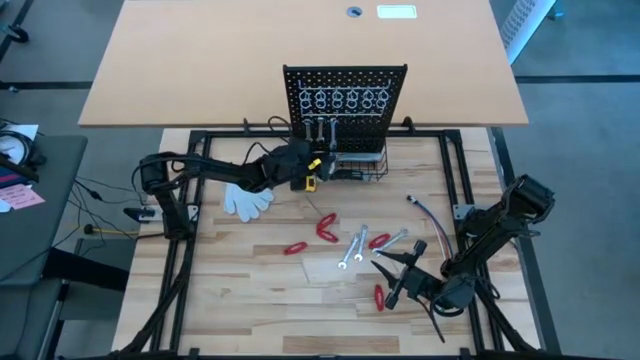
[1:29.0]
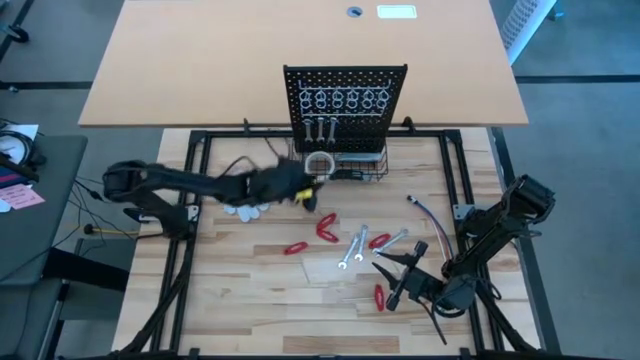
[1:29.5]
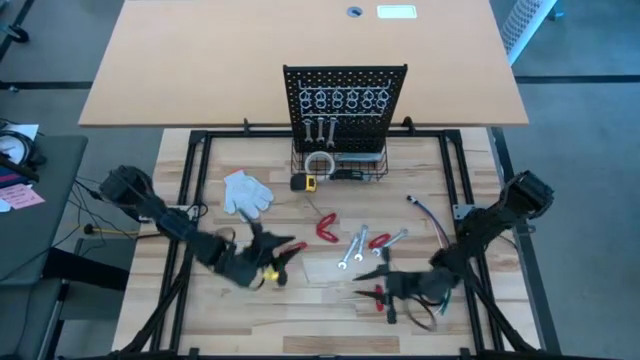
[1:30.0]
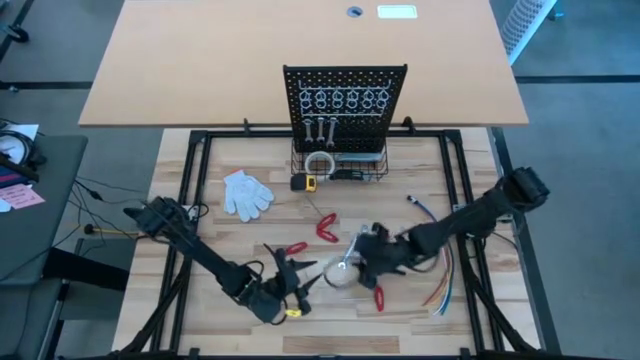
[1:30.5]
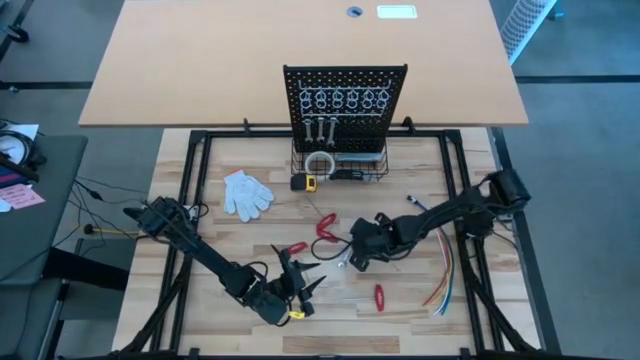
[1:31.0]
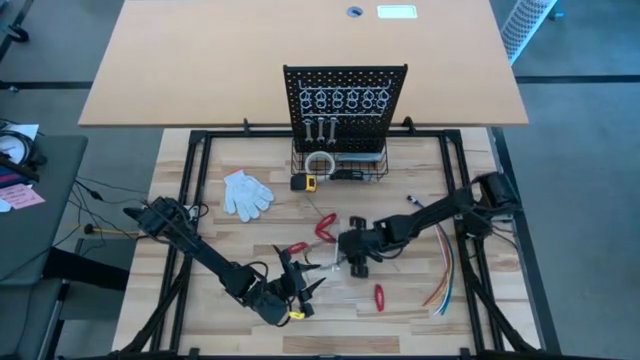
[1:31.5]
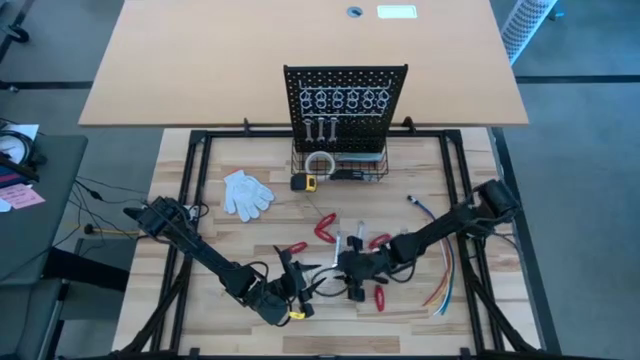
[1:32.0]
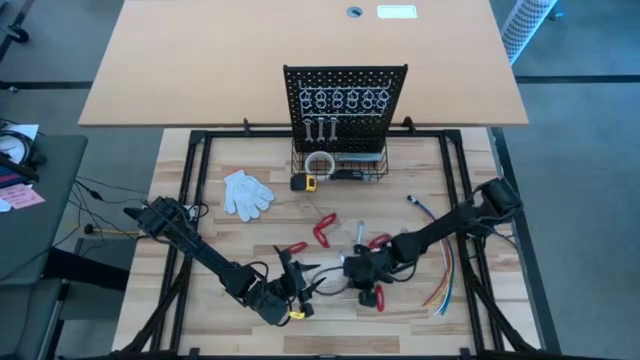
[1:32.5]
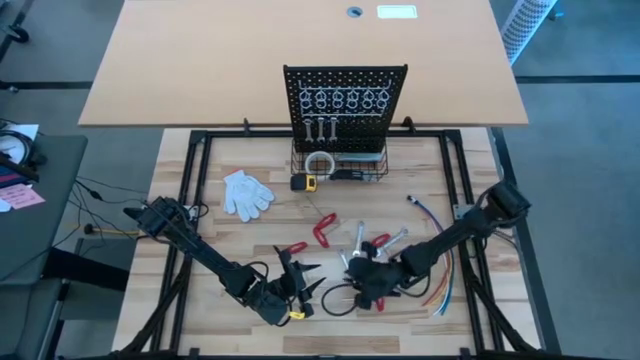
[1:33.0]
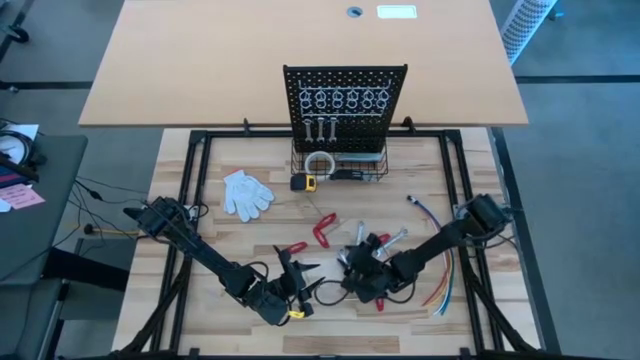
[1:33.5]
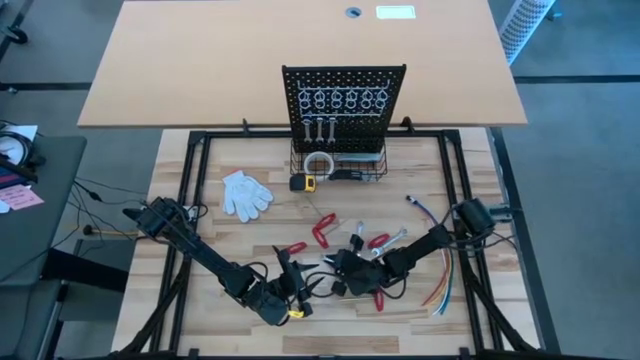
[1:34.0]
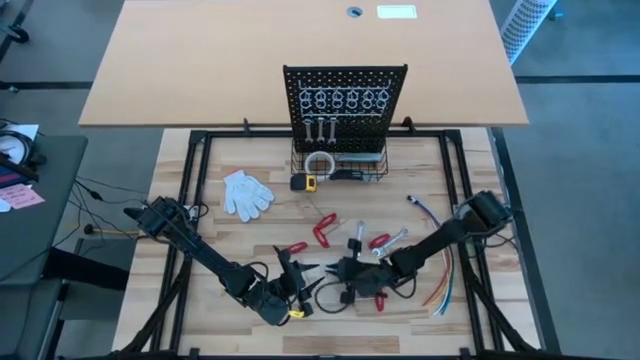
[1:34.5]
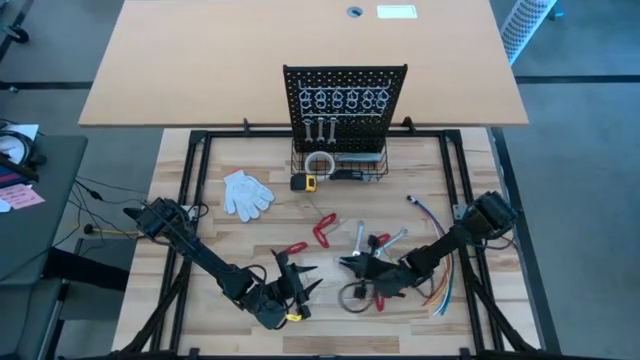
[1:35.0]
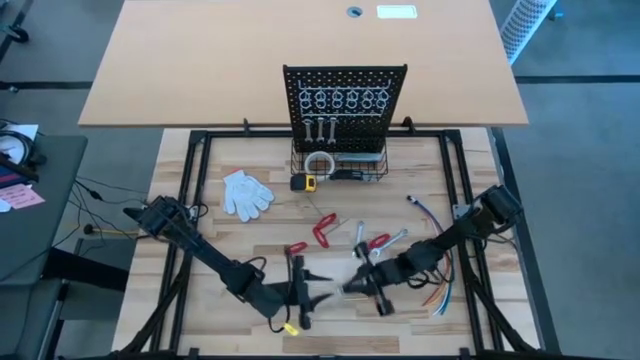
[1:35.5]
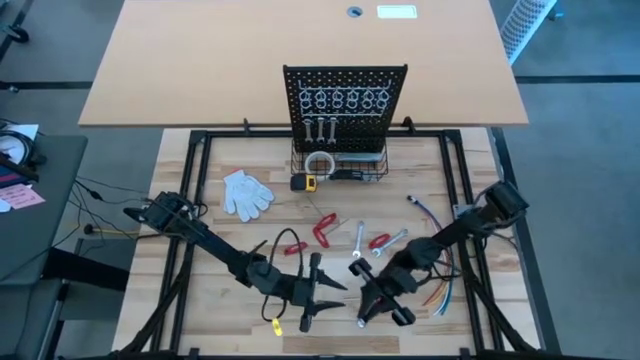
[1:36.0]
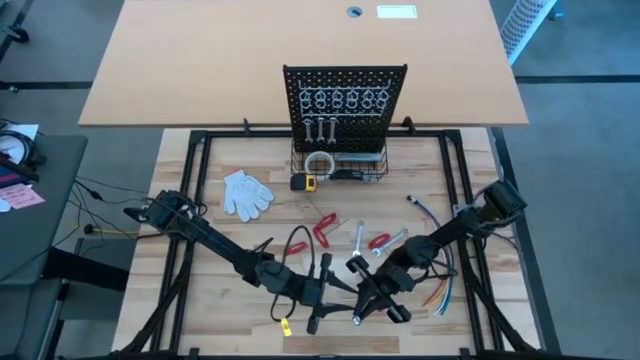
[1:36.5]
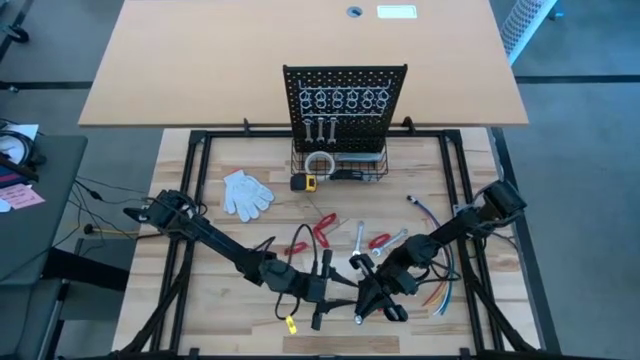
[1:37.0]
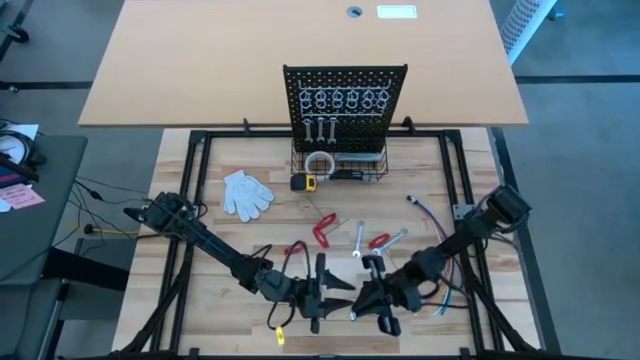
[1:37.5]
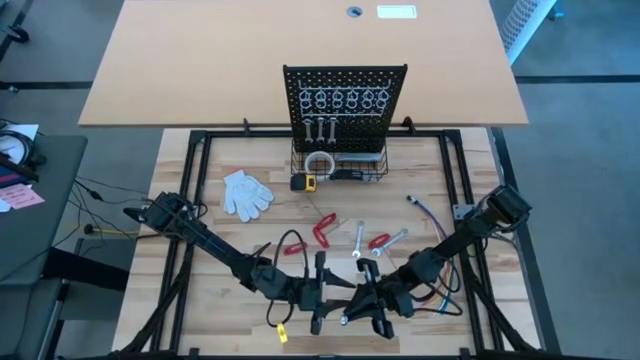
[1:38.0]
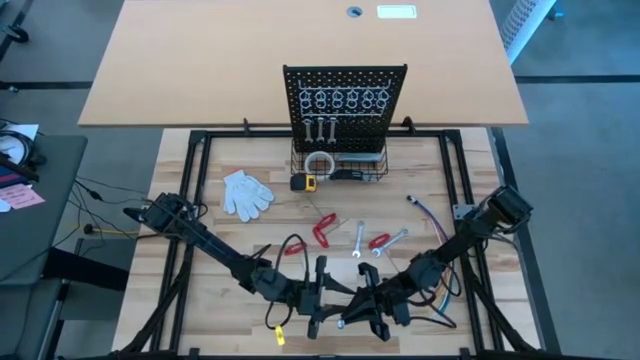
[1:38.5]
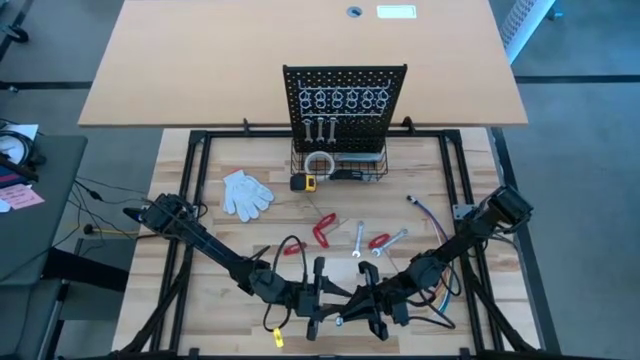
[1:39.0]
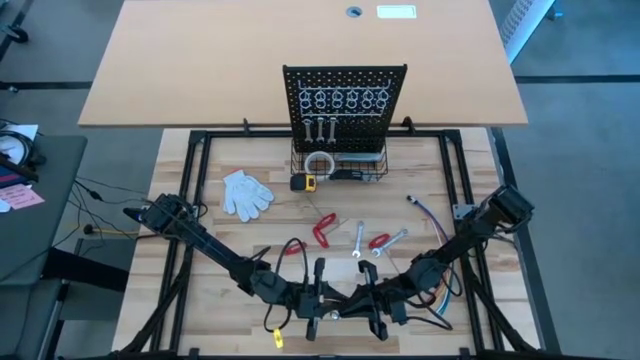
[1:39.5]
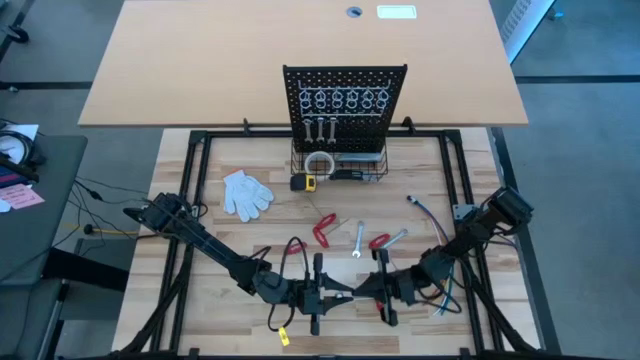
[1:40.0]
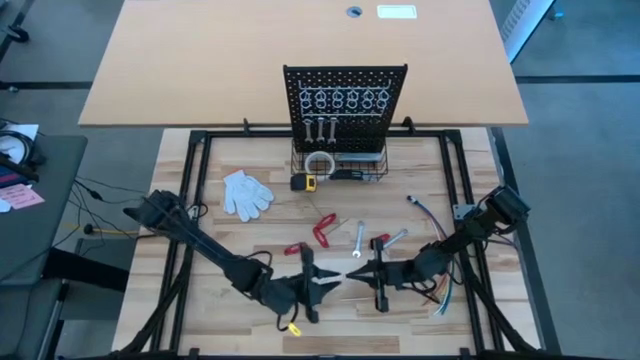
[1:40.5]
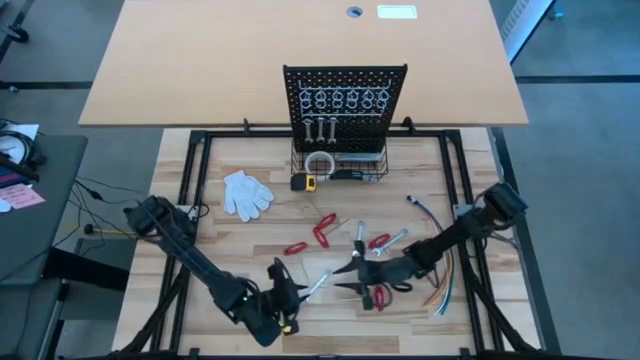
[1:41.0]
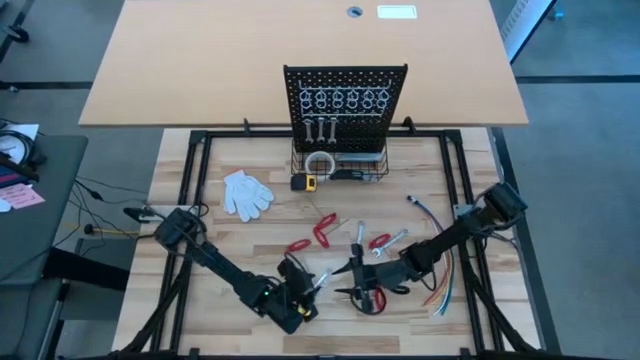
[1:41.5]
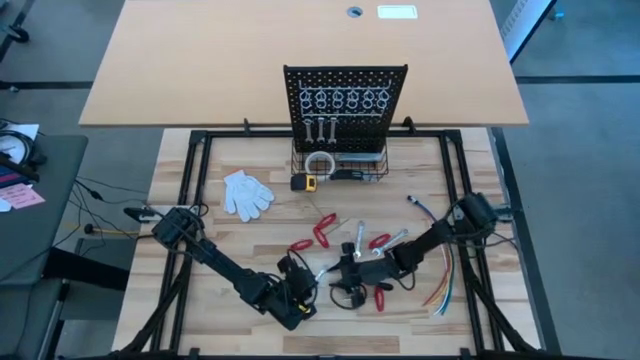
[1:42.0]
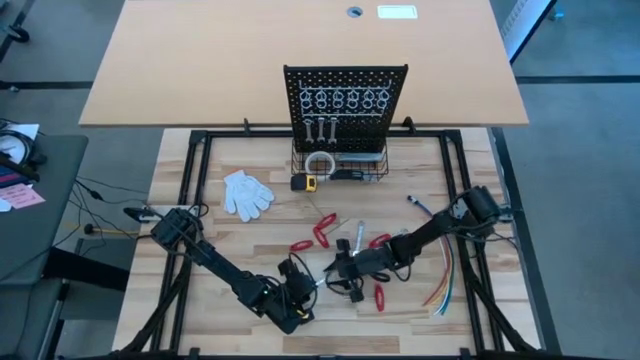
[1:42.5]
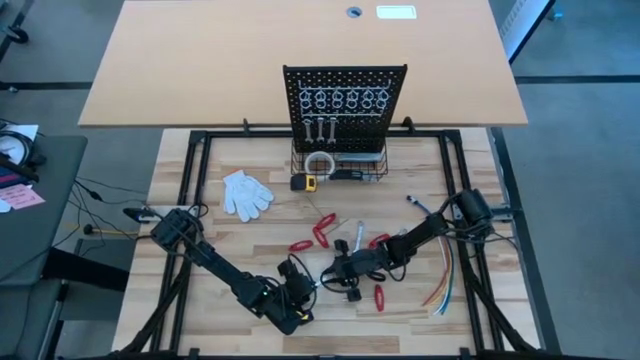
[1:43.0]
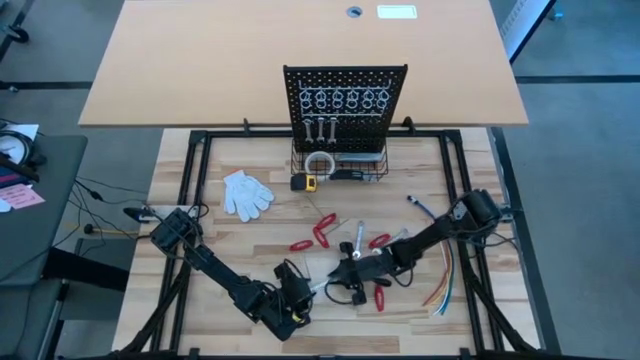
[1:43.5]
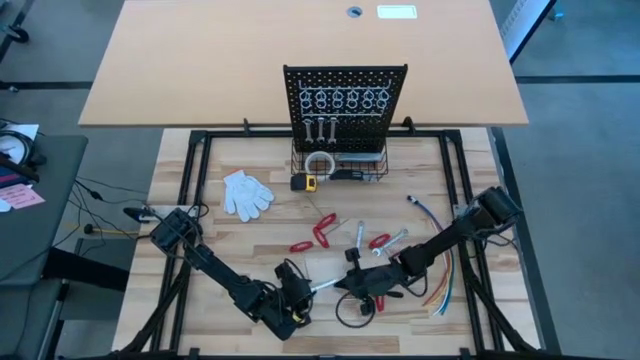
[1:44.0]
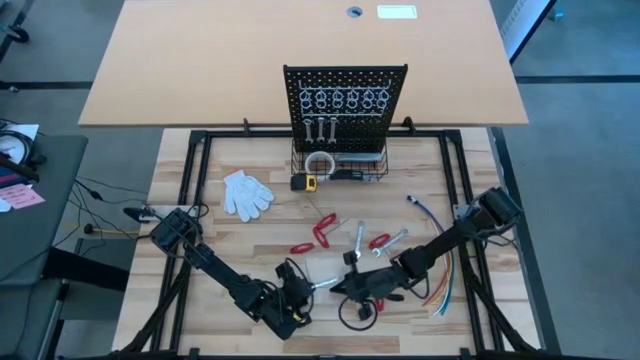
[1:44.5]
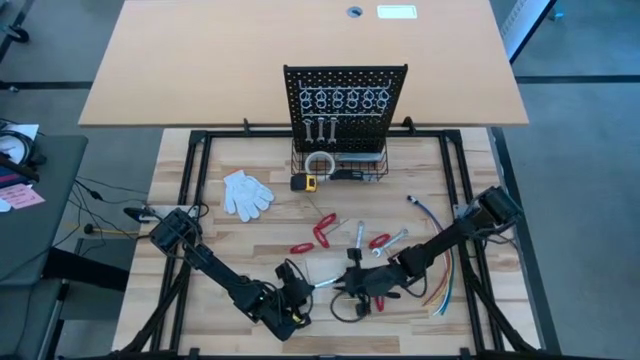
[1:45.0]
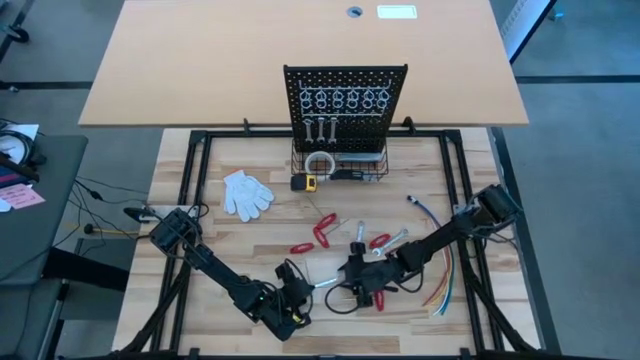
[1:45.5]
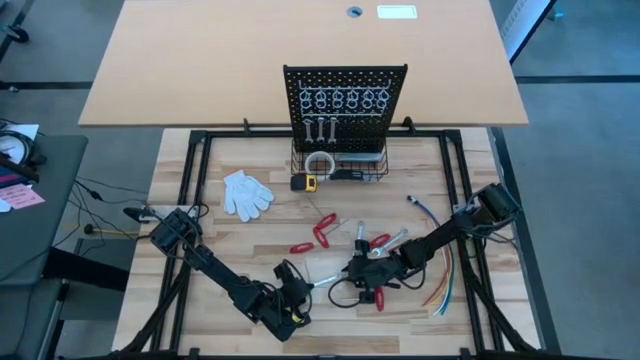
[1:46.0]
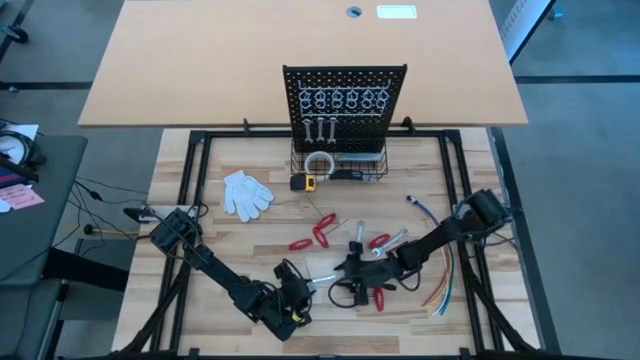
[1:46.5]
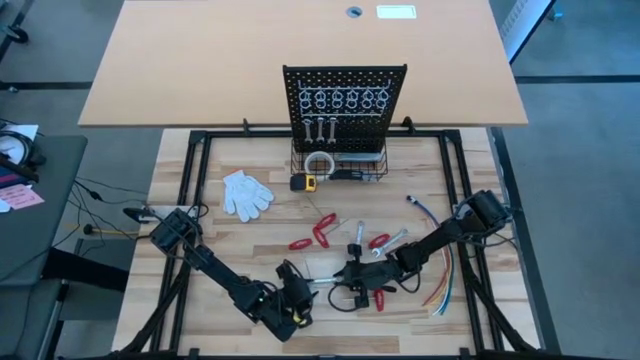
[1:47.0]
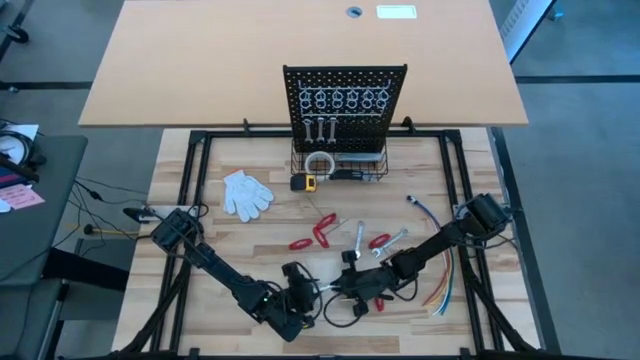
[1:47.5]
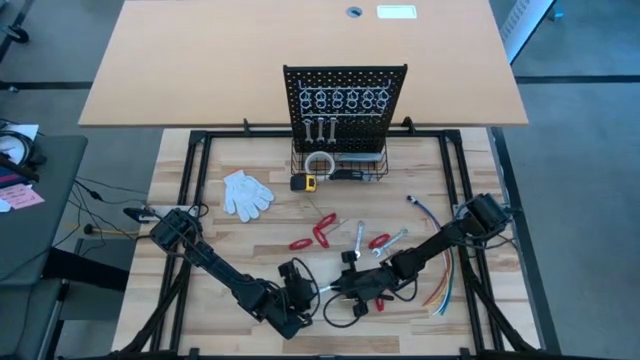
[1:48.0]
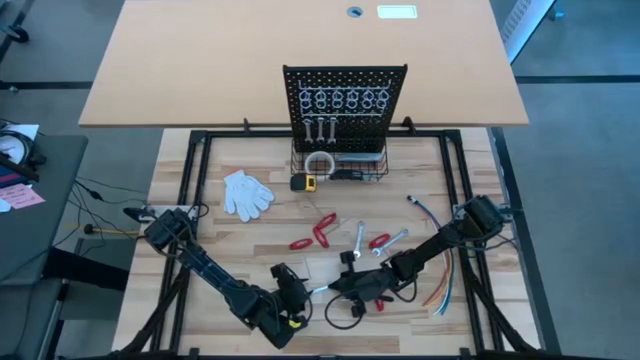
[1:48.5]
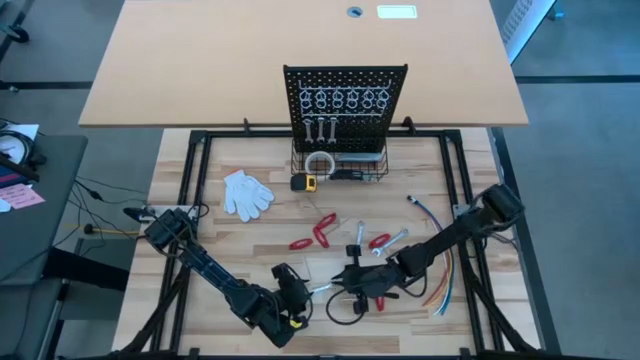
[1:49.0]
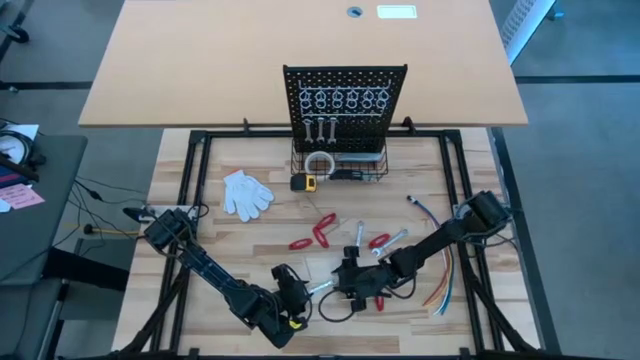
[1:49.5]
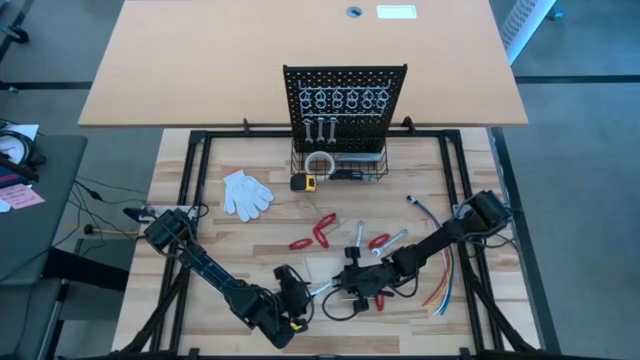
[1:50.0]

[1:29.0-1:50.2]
Task: Hang tools onto peg board
Hang the silver wrench on the peg board
